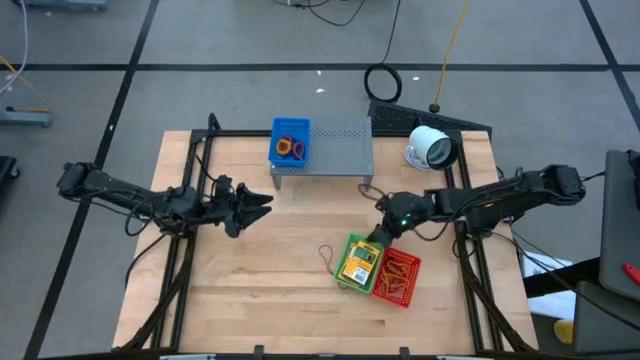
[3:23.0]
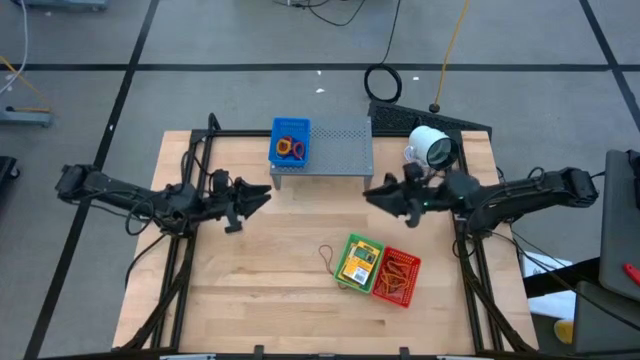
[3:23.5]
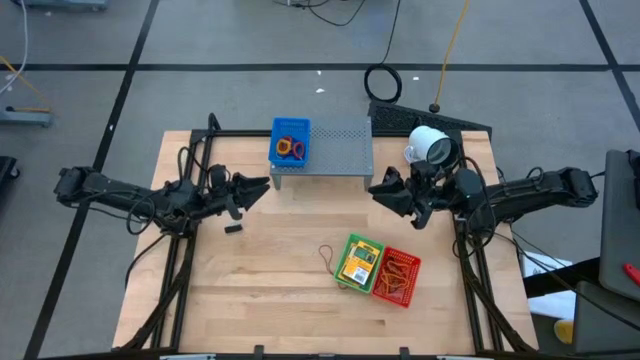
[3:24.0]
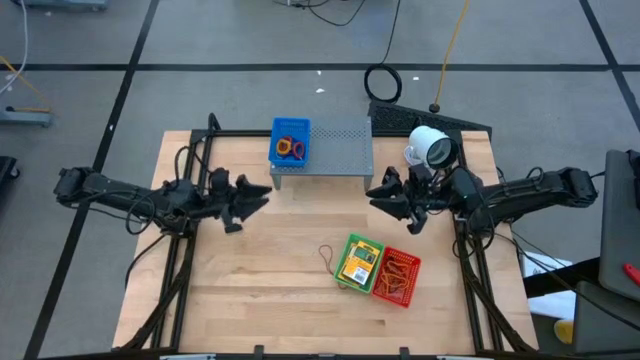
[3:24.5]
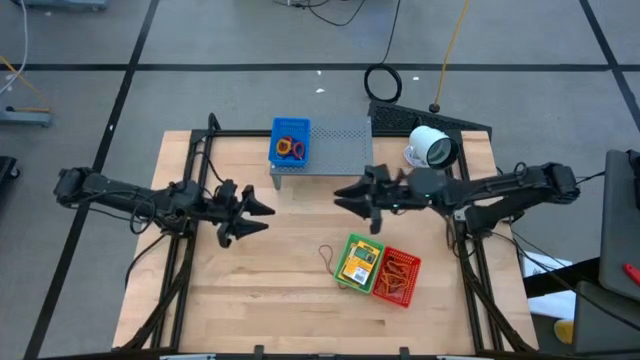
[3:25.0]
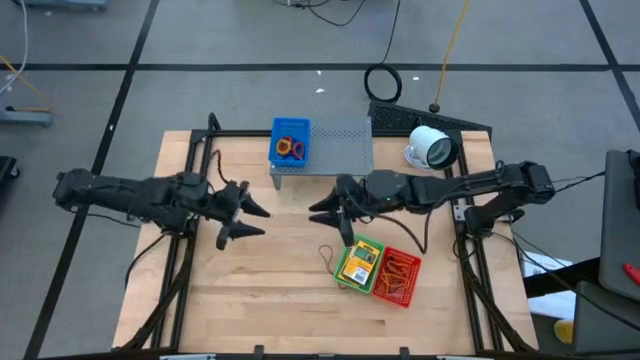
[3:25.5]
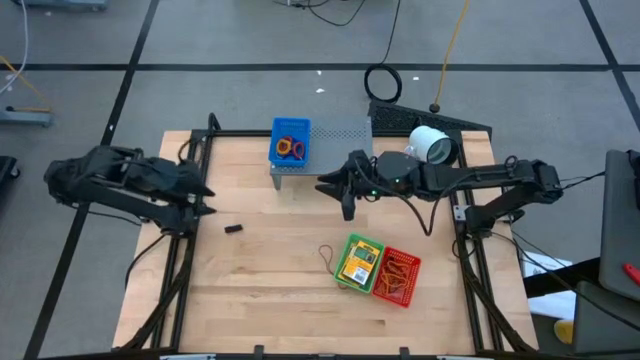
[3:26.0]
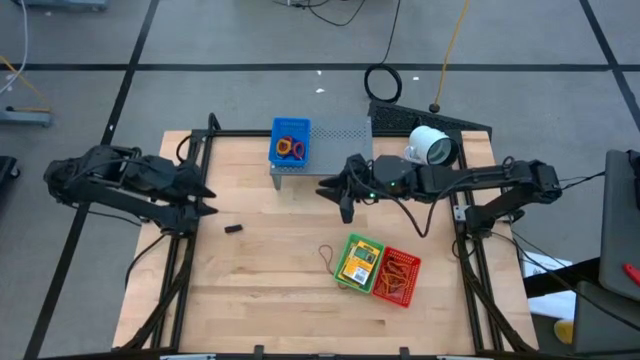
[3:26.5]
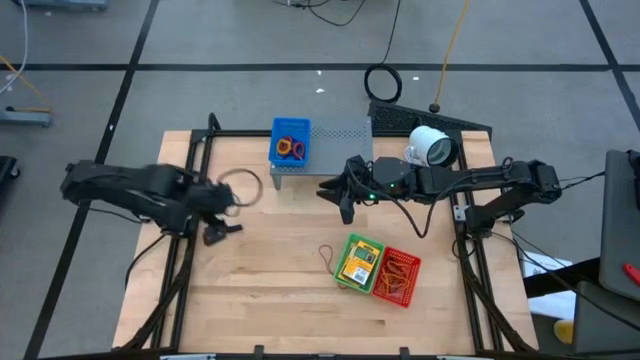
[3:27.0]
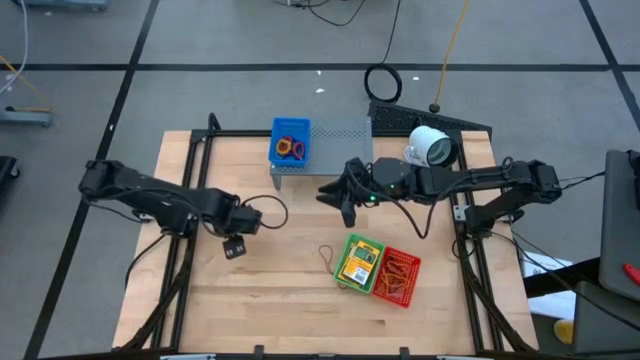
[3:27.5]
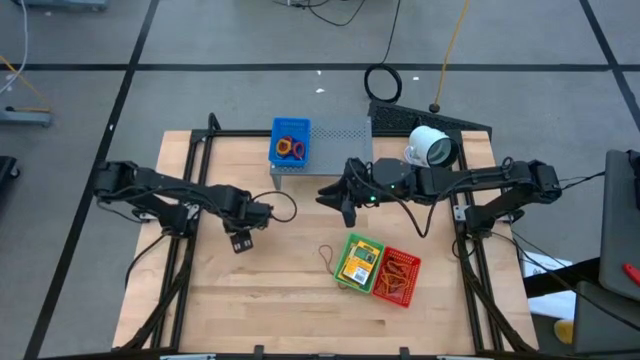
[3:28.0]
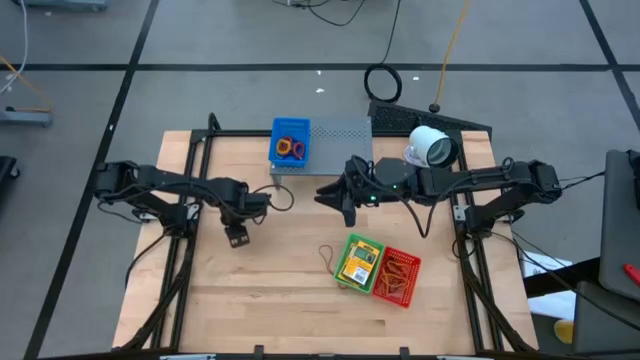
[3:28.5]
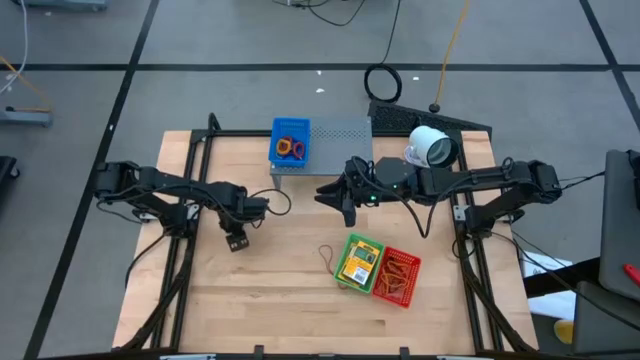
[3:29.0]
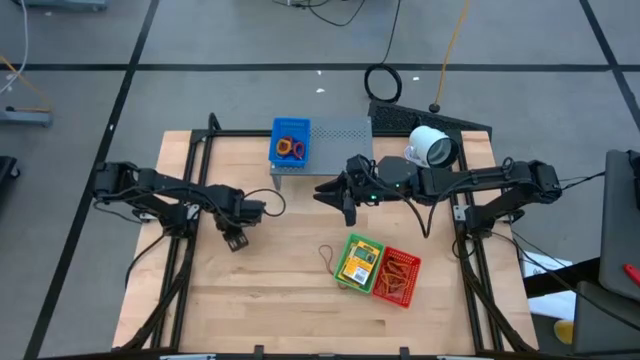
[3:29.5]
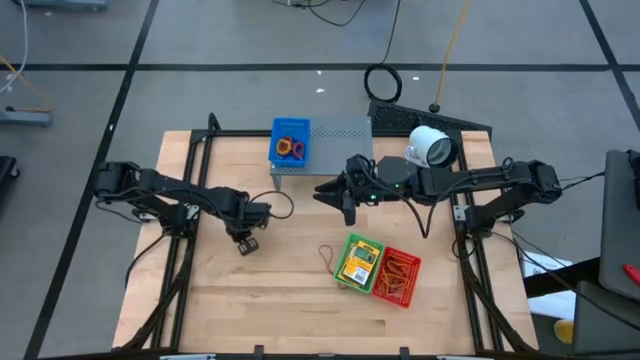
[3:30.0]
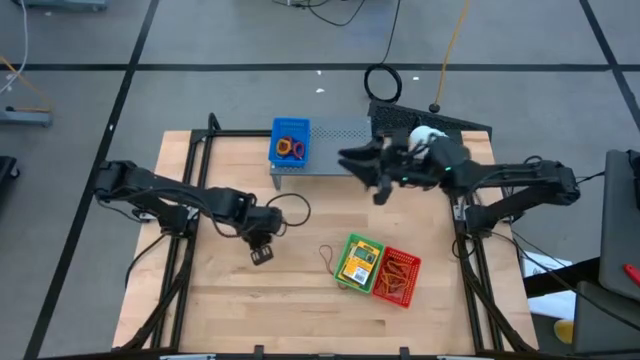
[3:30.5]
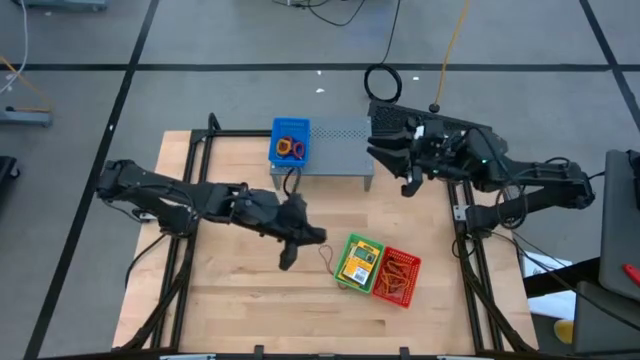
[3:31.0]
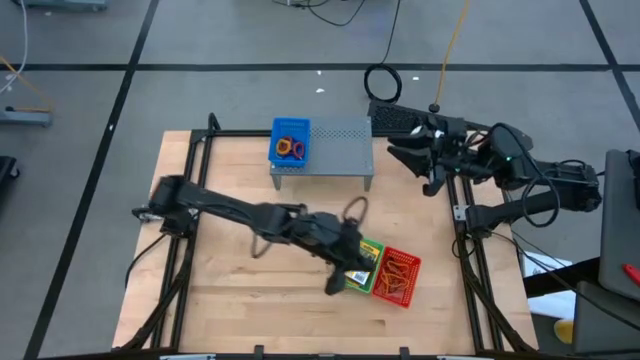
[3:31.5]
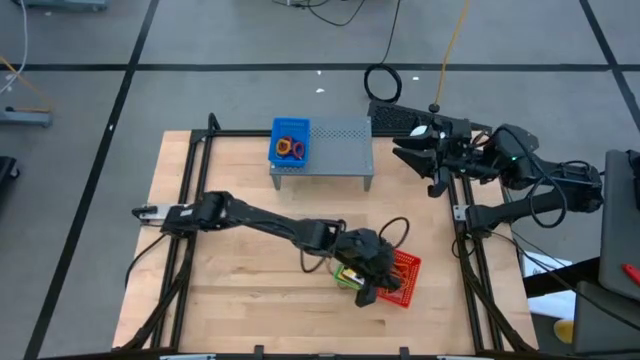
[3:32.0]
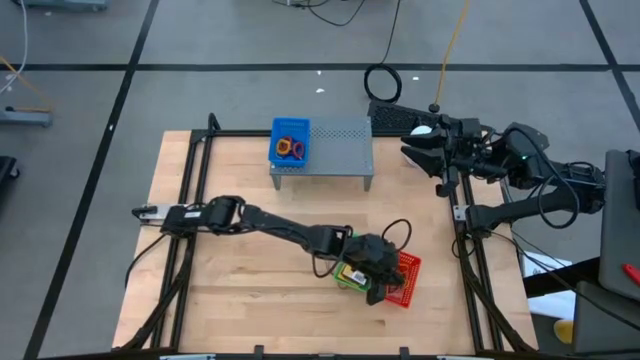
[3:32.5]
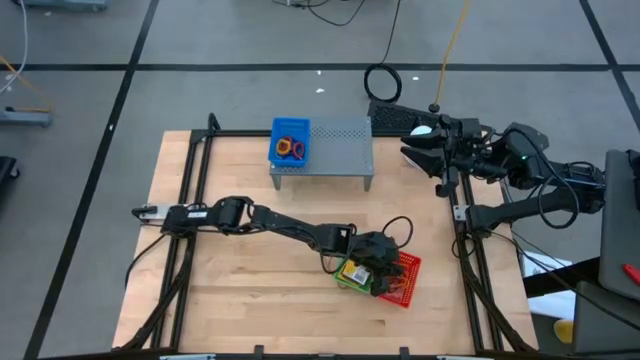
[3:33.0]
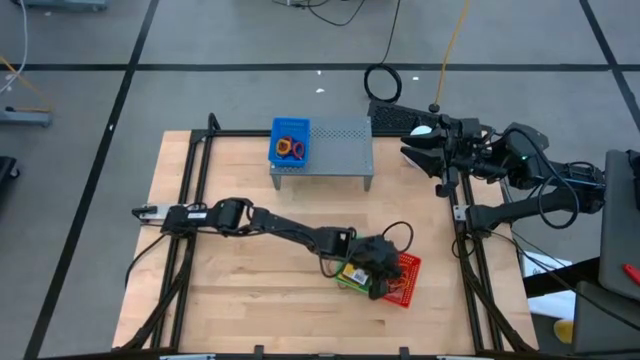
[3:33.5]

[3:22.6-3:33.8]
Task: Pick & Place Office Desk Supplies
Put the black rubber band into the red bin

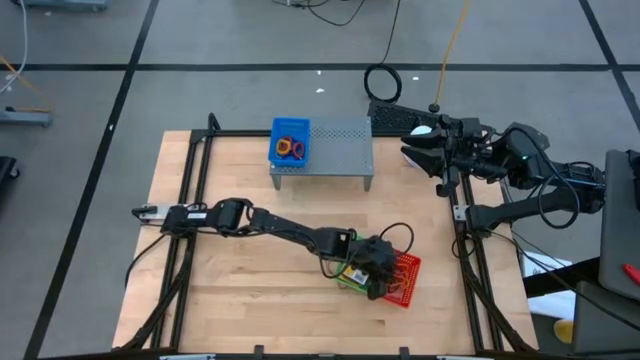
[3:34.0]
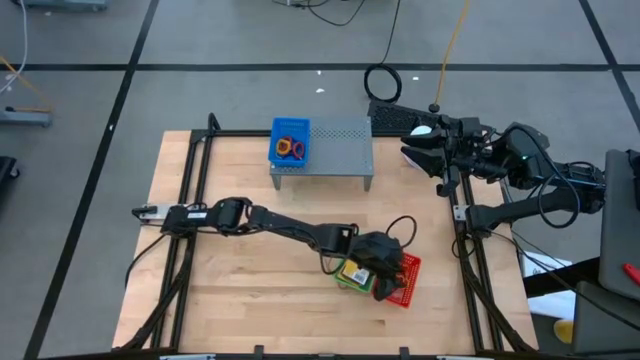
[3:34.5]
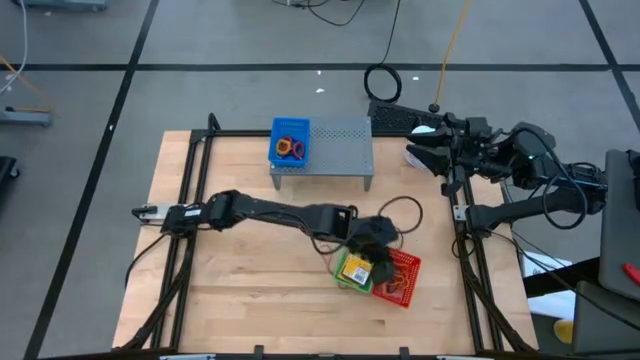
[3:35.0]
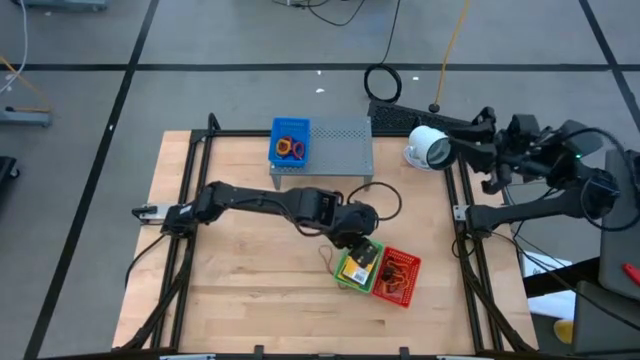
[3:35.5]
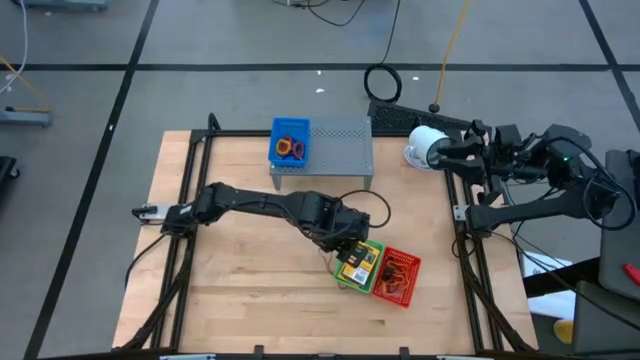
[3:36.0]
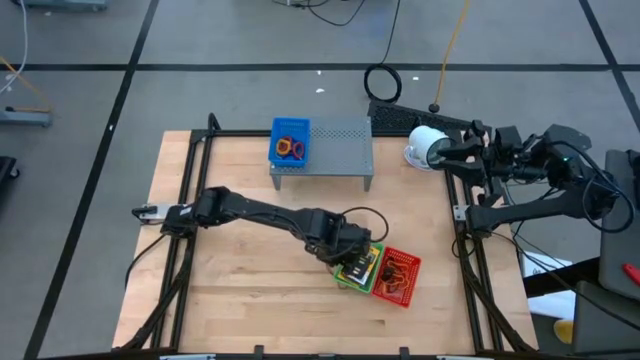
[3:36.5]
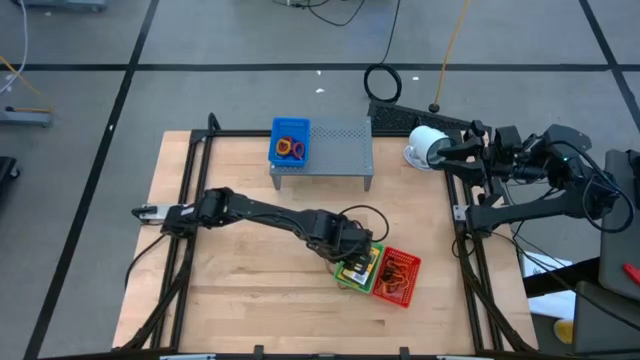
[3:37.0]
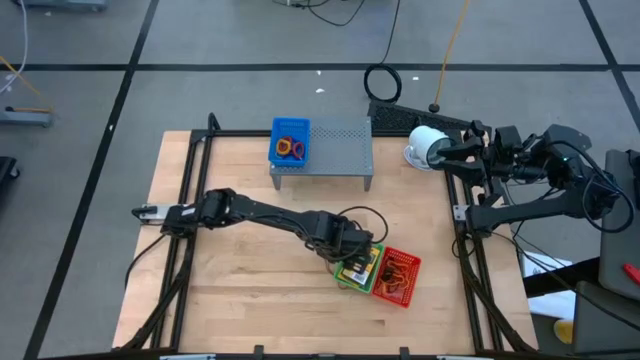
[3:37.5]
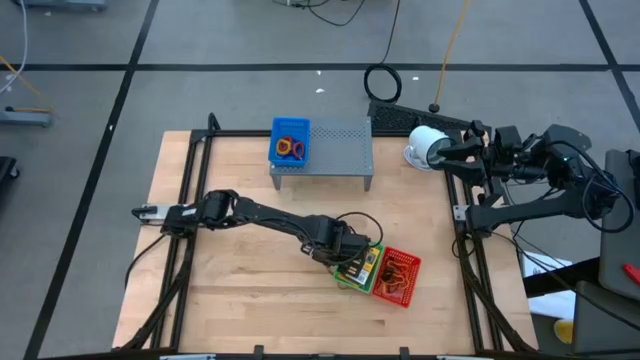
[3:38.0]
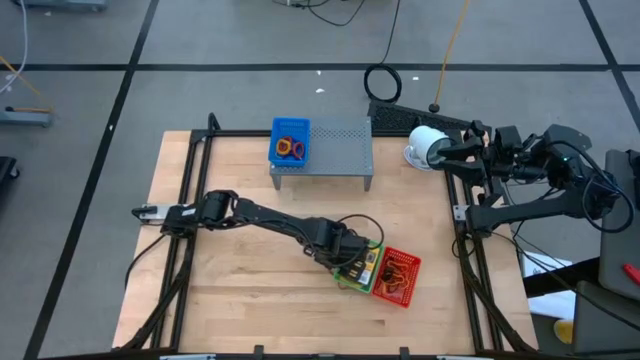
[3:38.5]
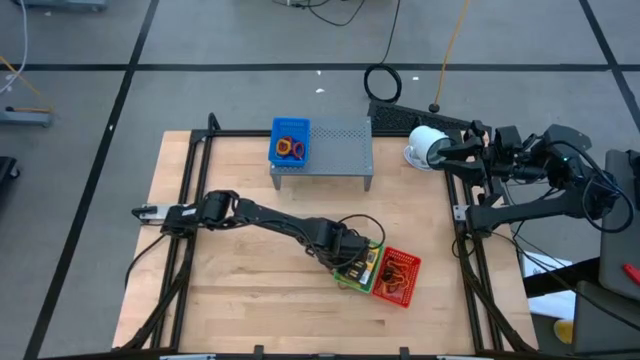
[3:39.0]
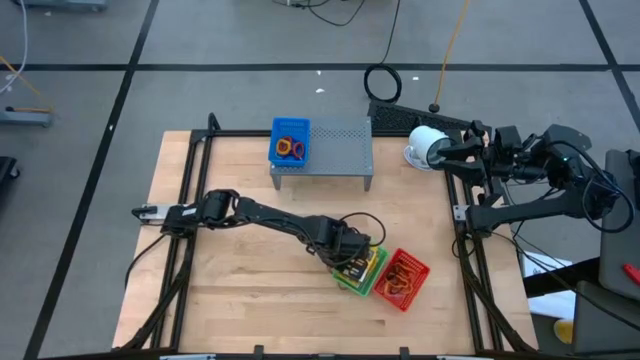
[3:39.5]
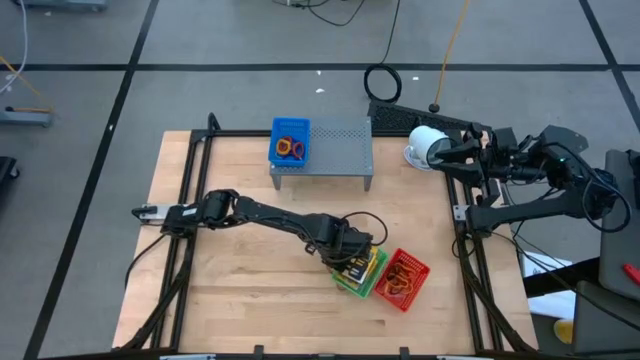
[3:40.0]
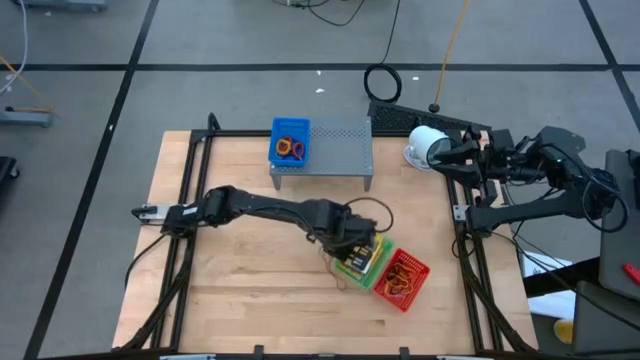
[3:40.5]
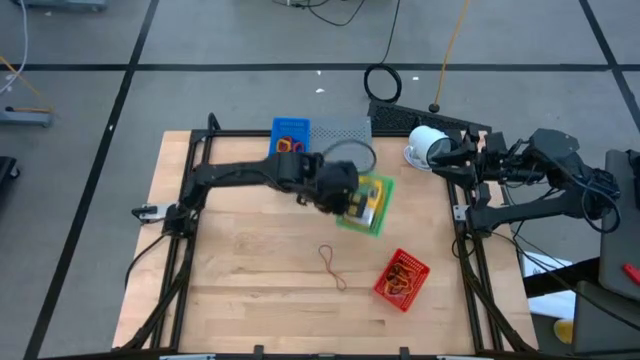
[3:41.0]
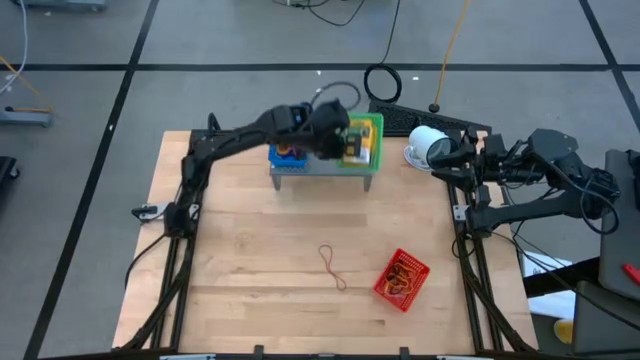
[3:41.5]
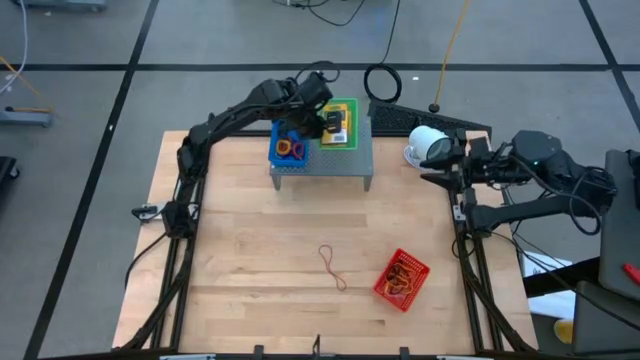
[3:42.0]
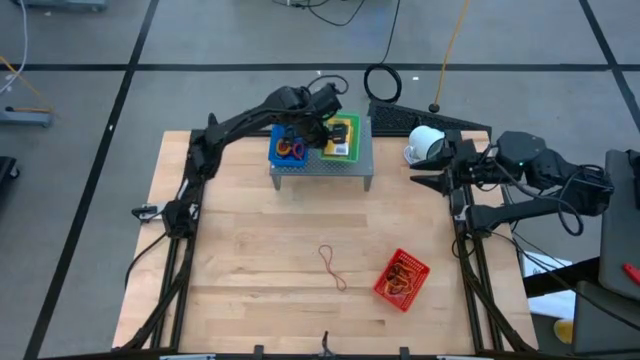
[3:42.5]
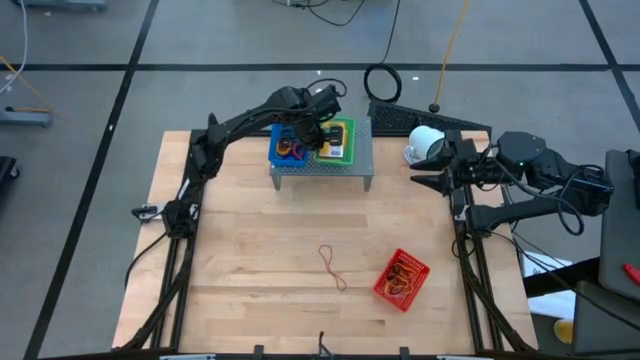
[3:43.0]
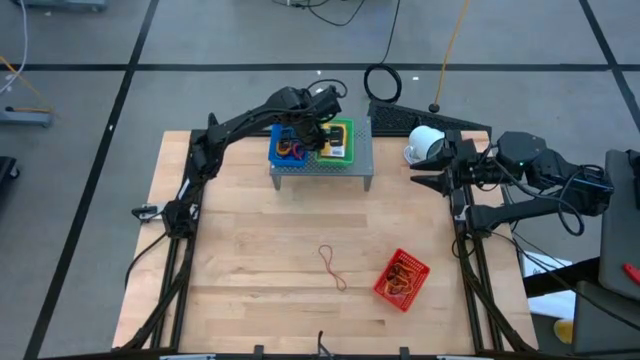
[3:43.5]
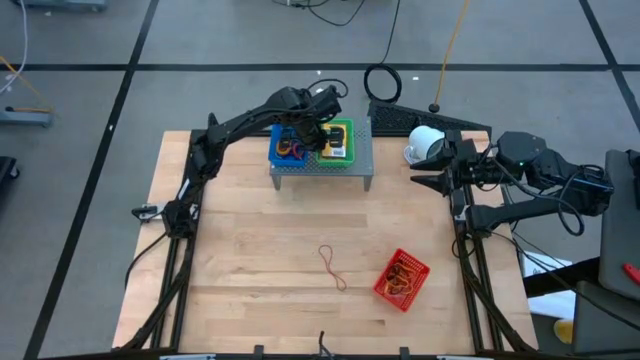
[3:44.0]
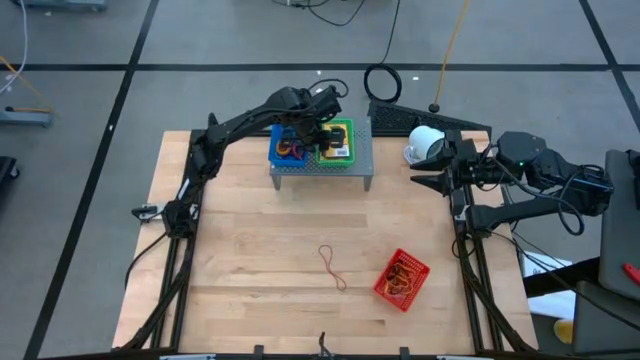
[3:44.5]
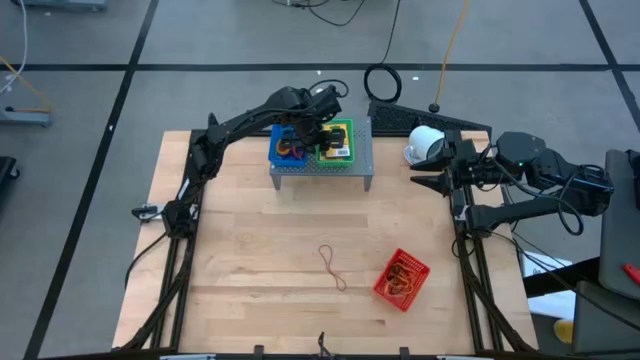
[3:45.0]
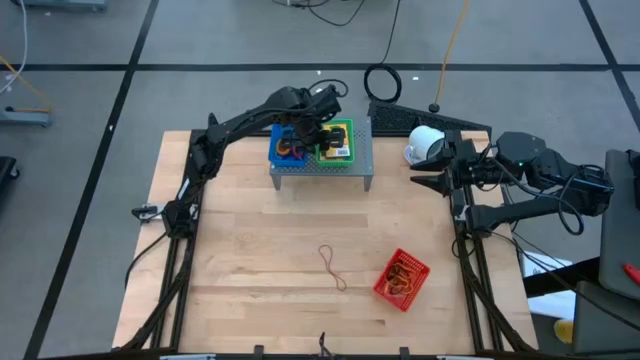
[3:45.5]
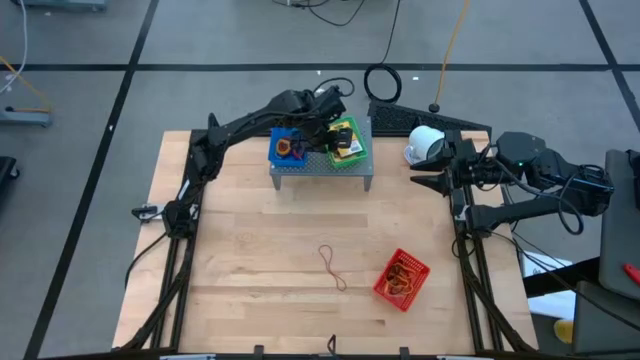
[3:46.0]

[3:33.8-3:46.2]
Put the green bin on the shelf
